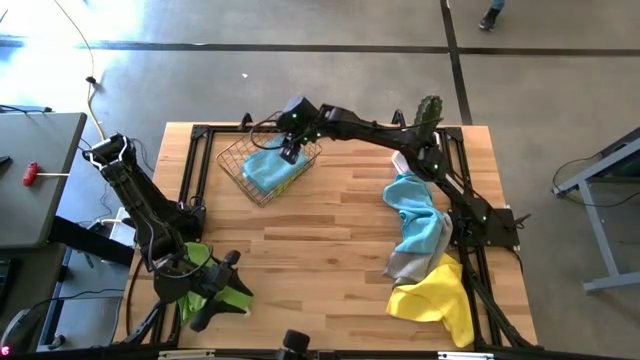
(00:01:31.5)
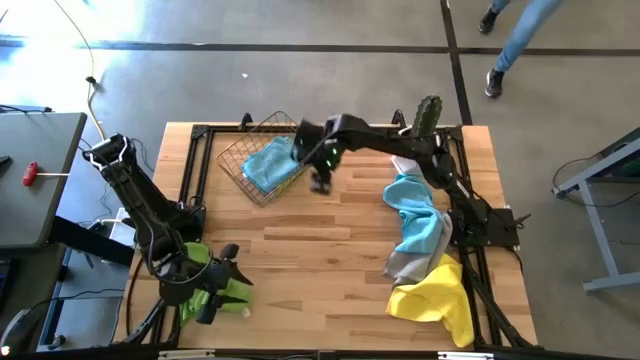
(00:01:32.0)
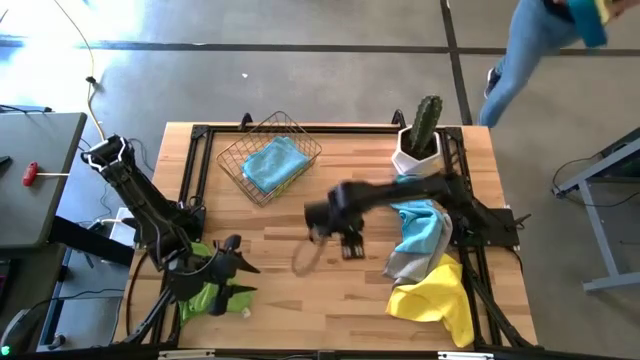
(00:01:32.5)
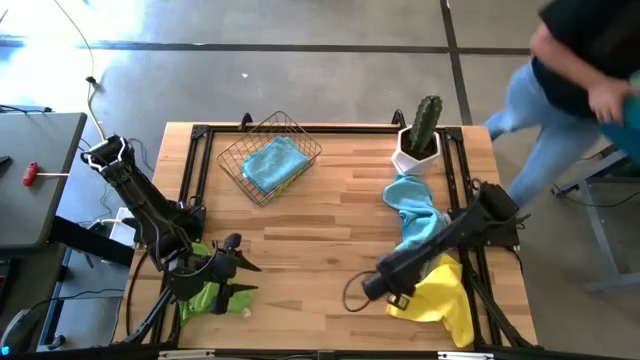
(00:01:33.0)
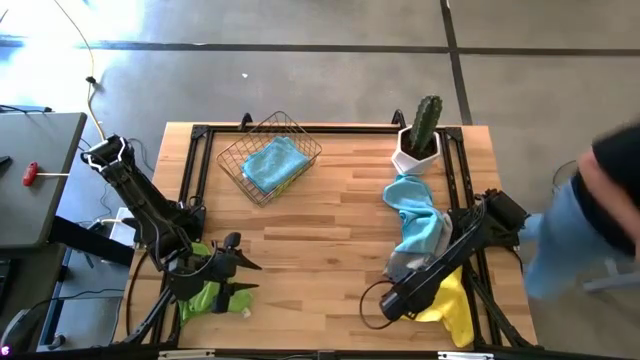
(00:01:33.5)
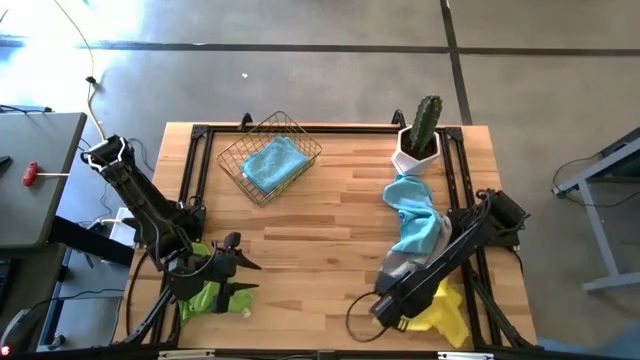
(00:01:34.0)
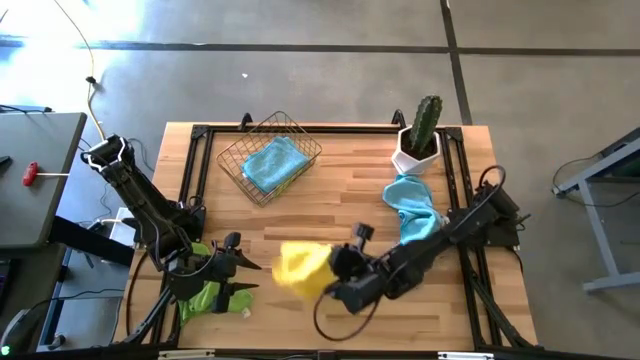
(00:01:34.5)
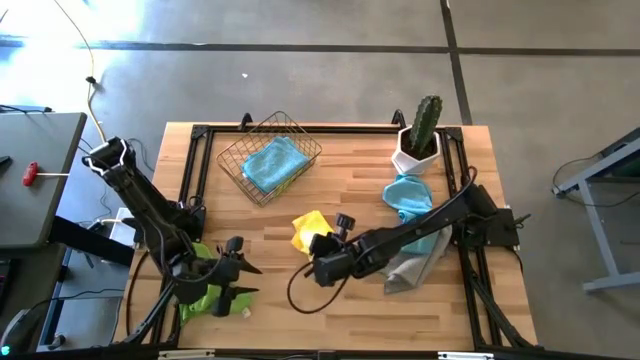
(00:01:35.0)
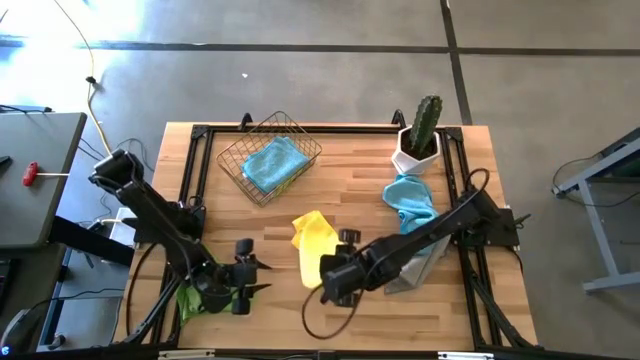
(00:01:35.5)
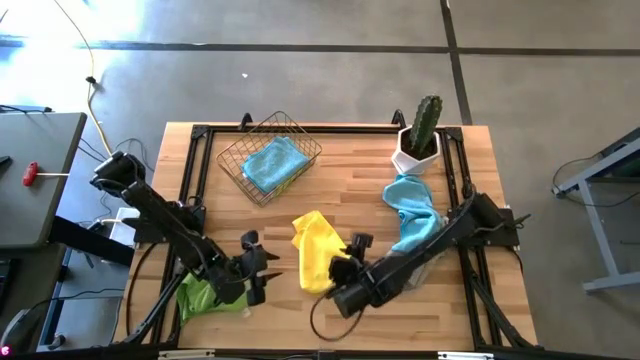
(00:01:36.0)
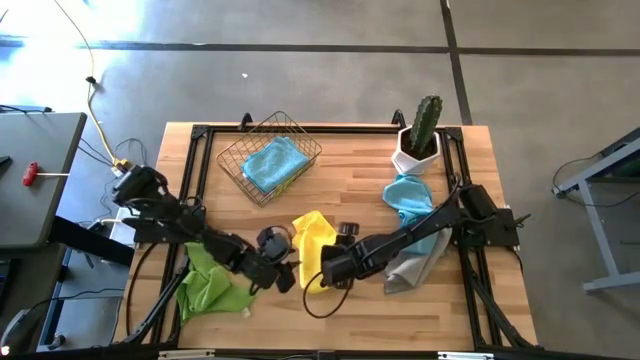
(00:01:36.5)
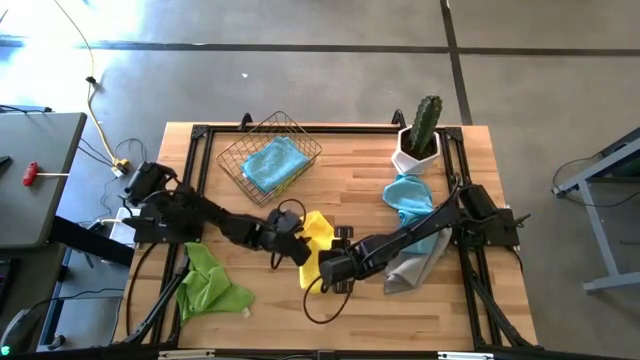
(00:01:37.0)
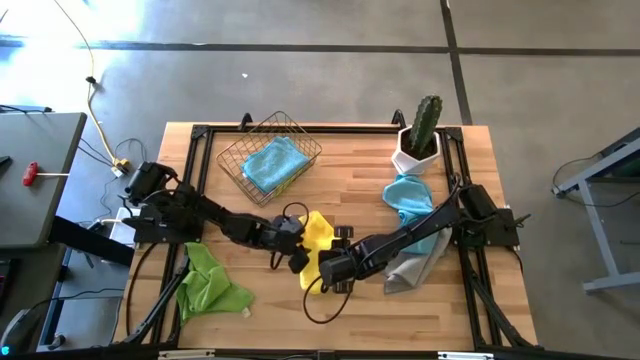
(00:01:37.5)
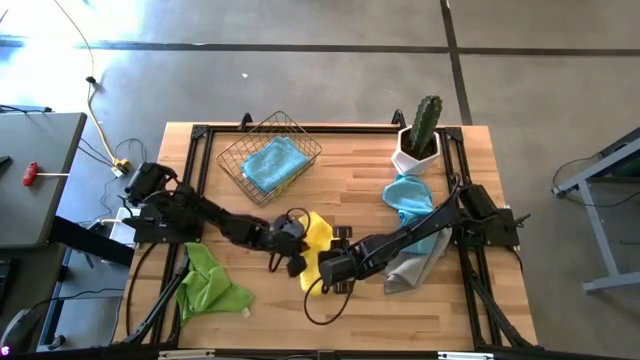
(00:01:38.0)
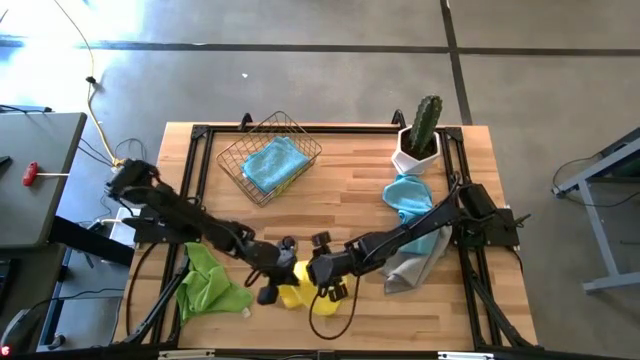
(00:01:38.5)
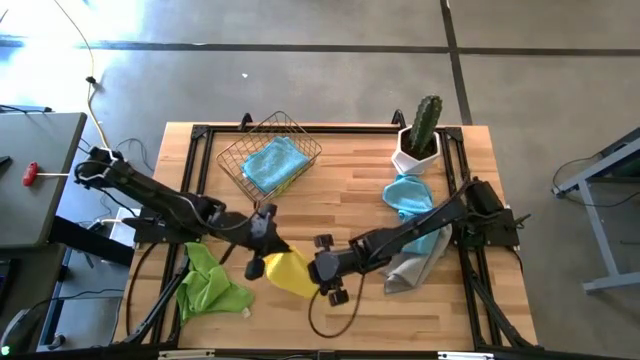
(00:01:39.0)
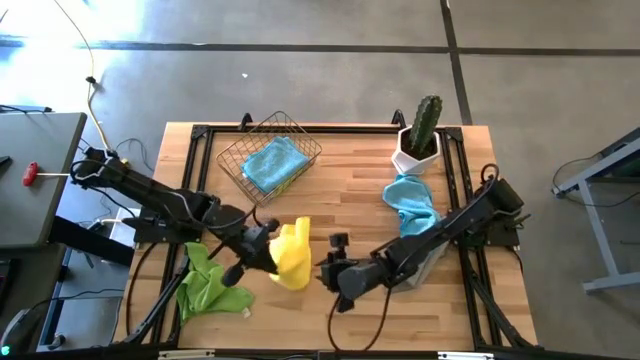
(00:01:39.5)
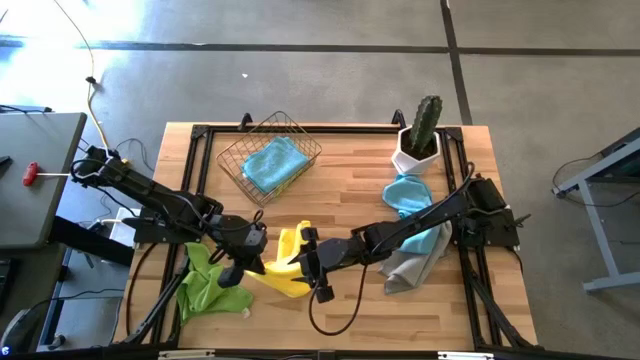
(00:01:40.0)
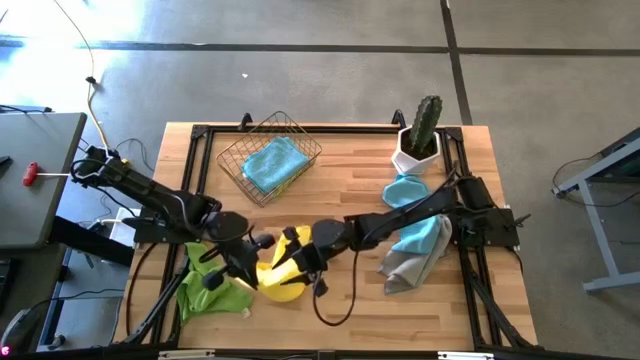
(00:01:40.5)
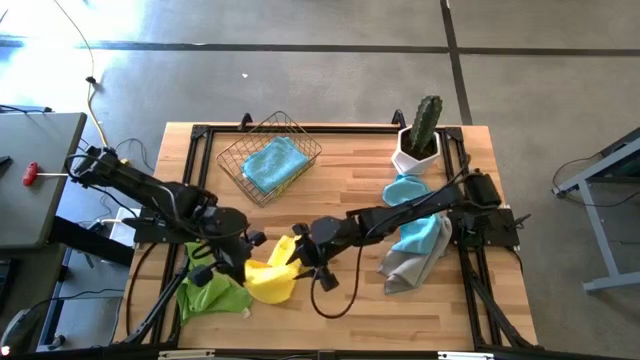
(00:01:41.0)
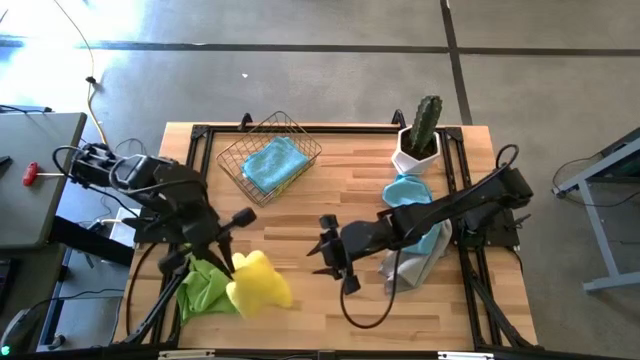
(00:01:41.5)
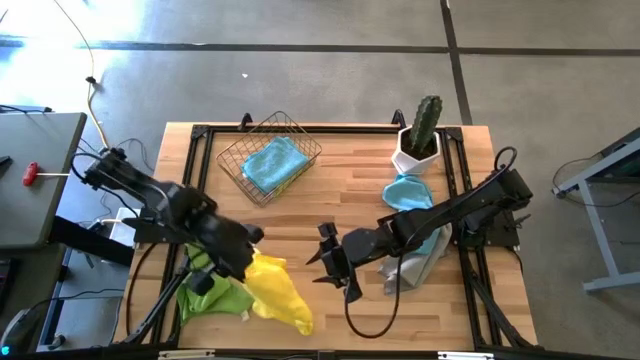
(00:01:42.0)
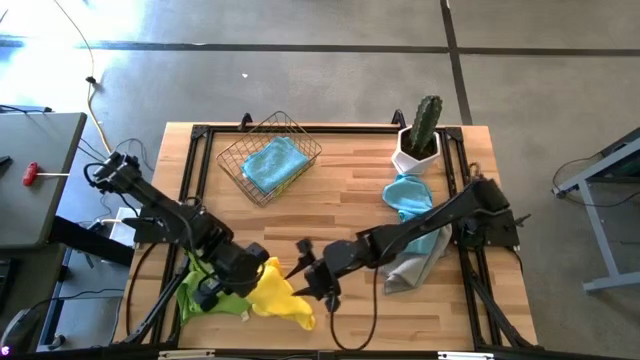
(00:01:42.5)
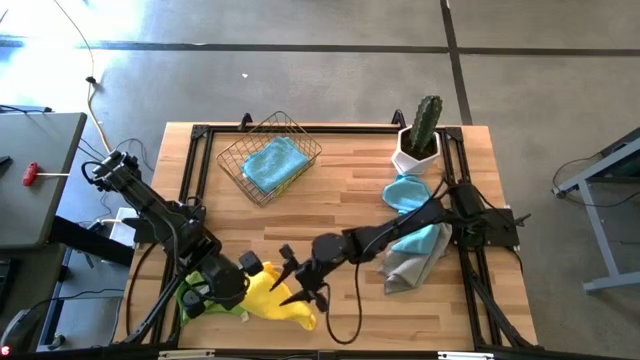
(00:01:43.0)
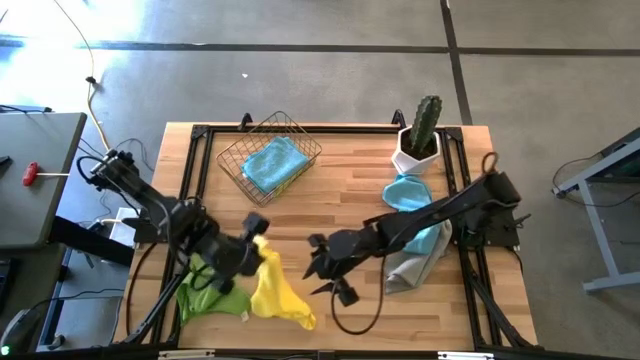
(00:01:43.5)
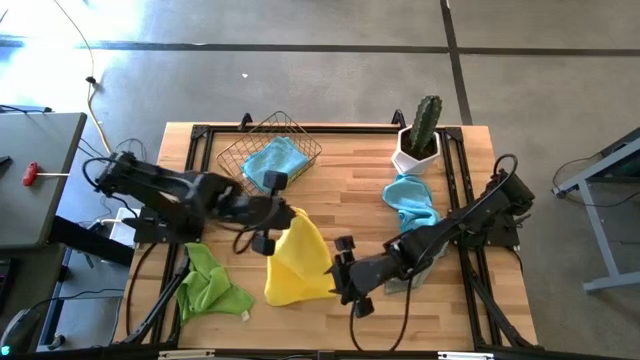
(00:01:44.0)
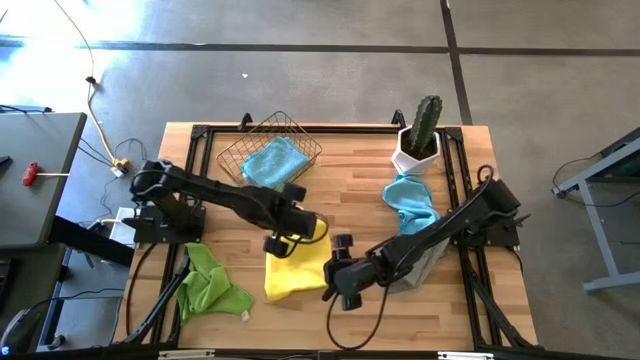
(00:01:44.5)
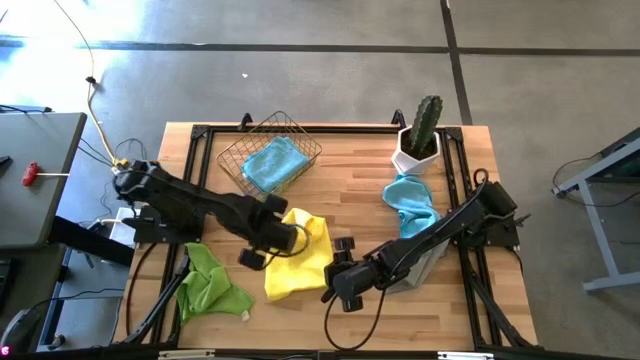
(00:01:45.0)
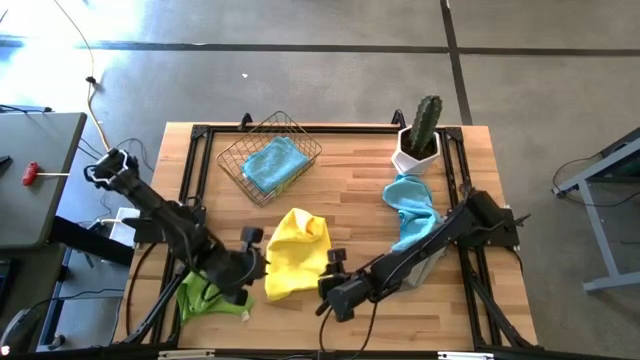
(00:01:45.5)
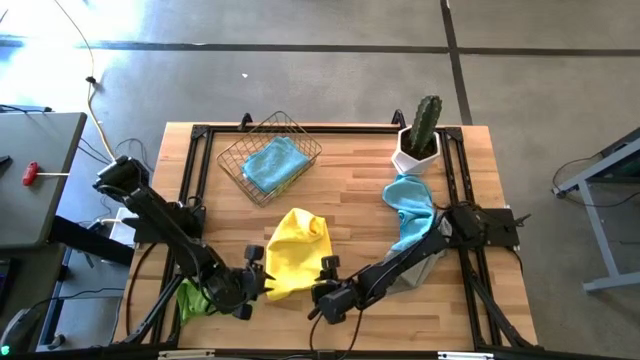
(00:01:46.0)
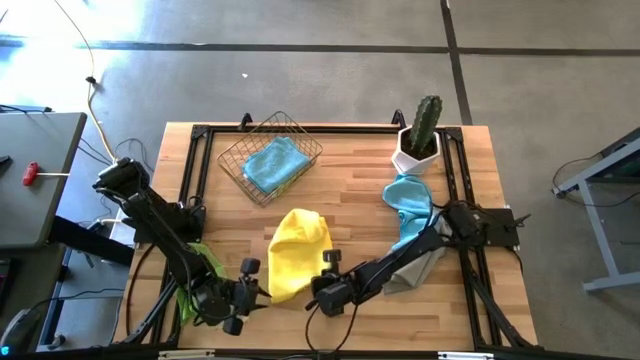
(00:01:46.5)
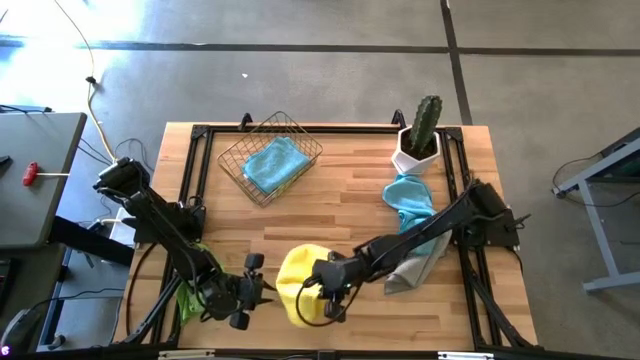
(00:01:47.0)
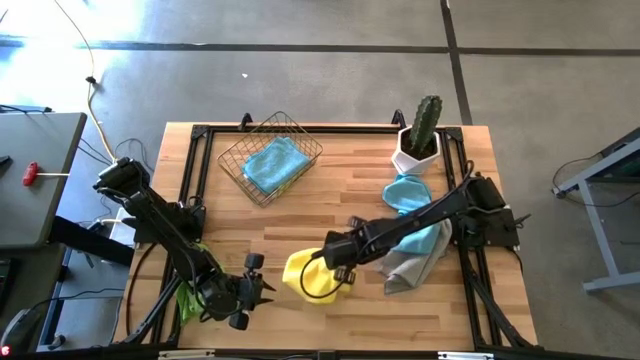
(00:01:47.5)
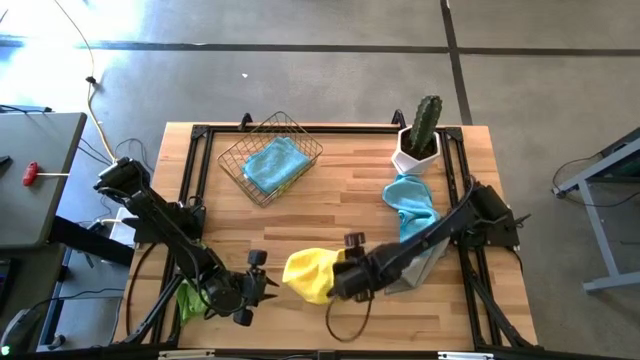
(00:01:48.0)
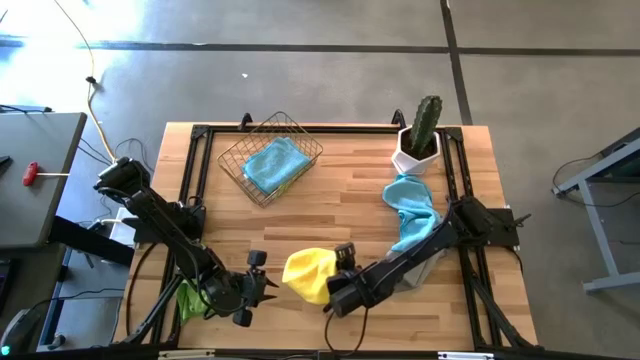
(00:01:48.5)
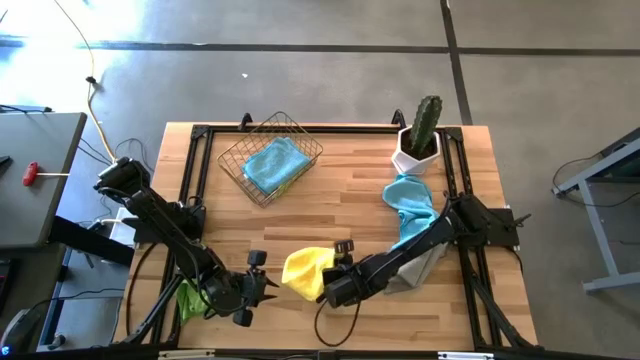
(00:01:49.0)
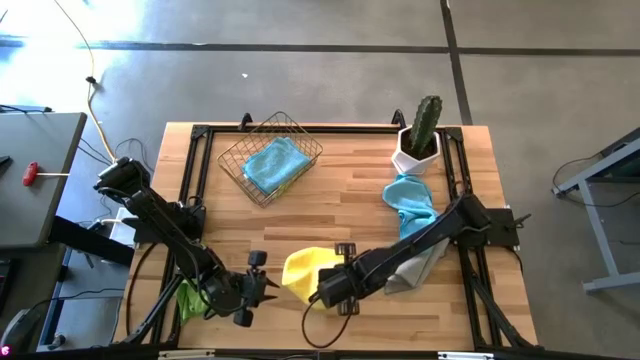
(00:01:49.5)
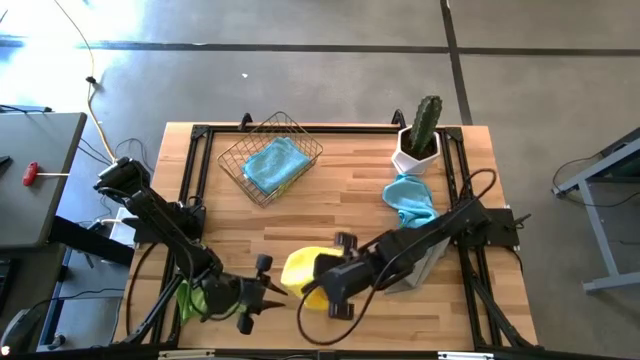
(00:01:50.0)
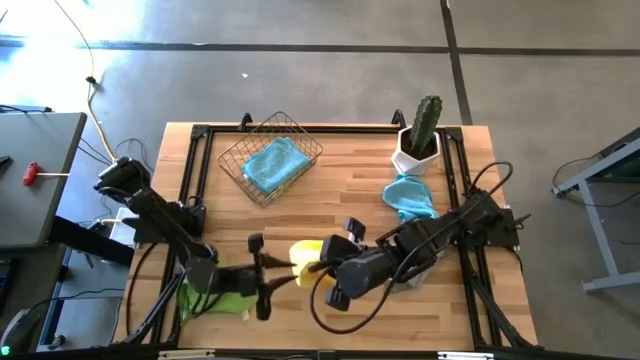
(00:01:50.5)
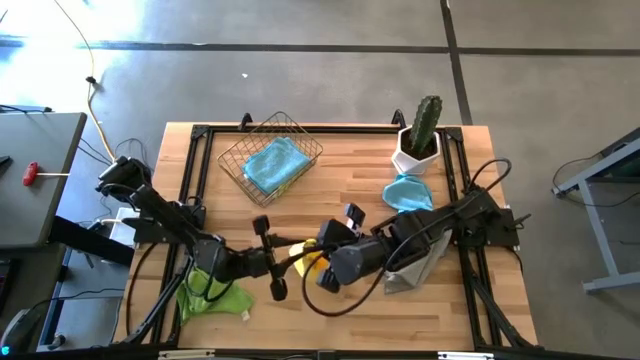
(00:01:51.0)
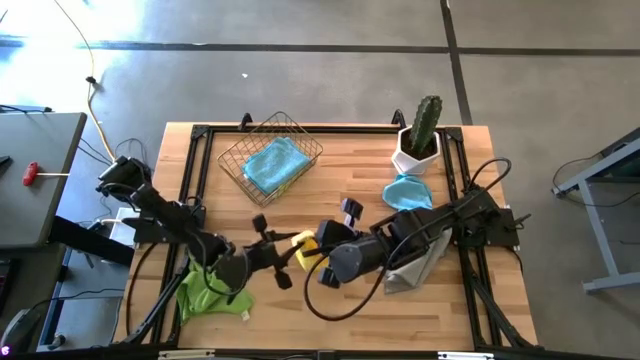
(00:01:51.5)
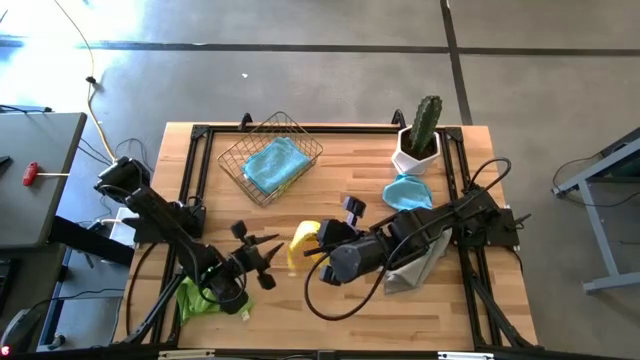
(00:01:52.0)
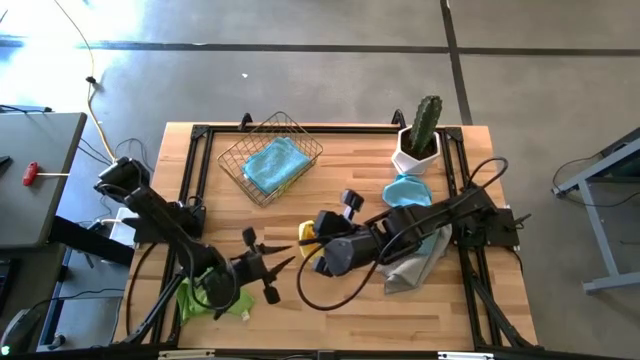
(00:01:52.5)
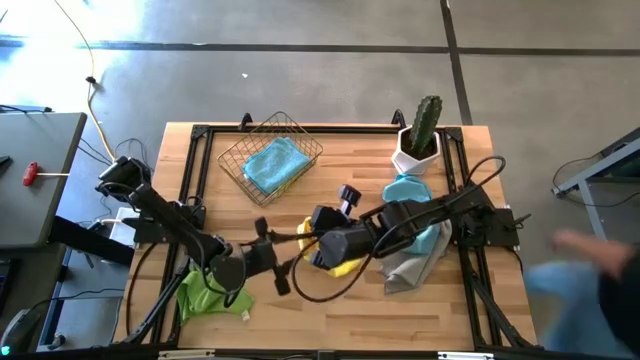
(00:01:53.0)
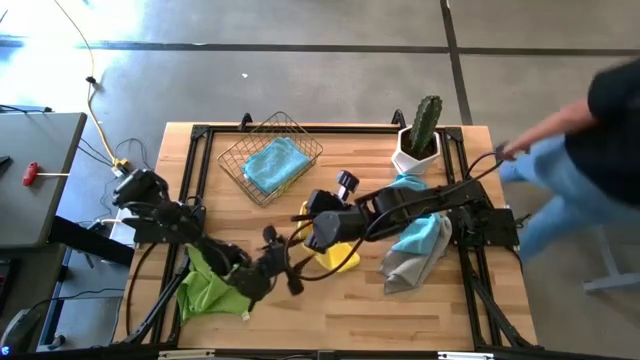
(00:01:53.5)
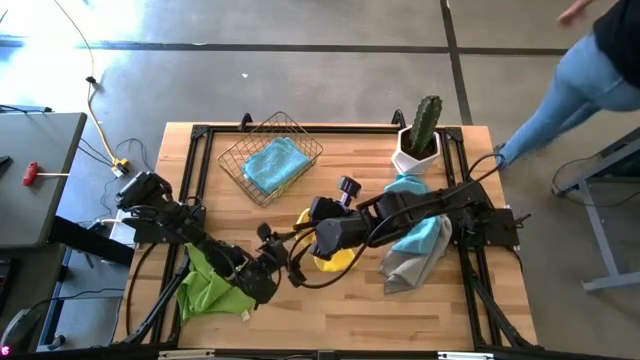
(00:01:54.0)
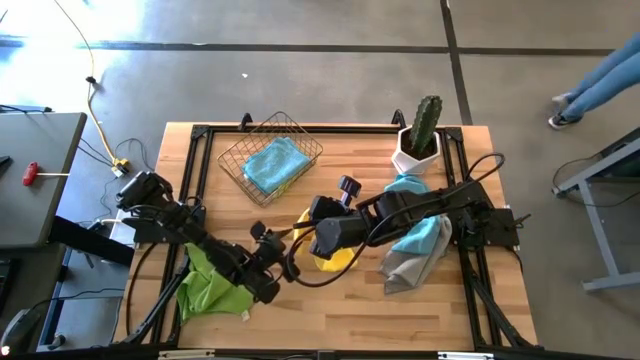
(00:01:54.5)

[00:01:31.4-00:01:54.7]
Task: Fold microfiber towels
Fold the yellow microfiber towel
